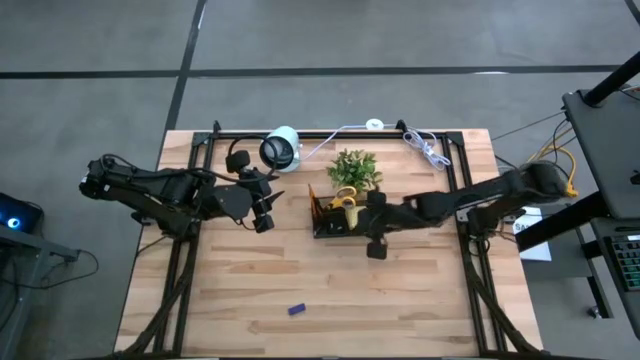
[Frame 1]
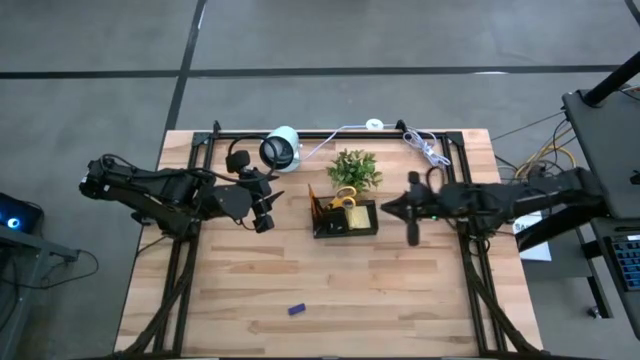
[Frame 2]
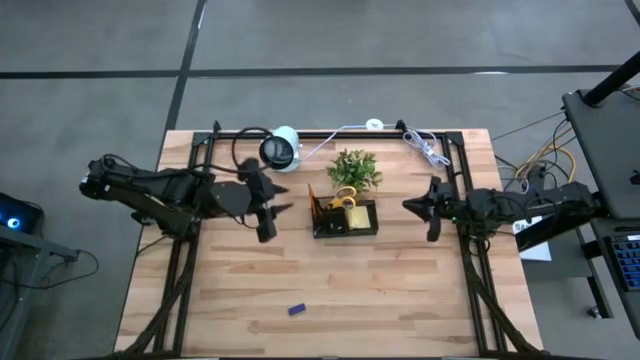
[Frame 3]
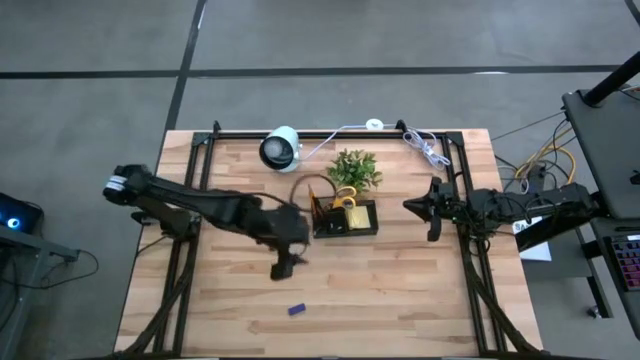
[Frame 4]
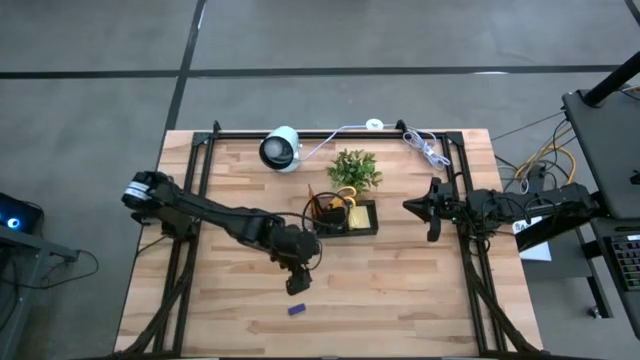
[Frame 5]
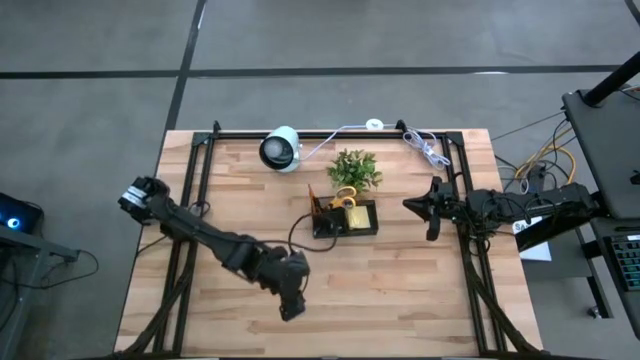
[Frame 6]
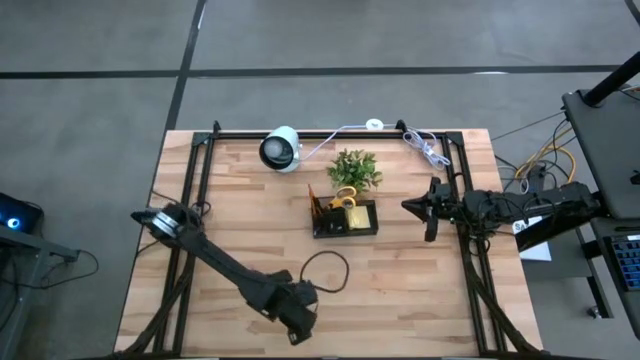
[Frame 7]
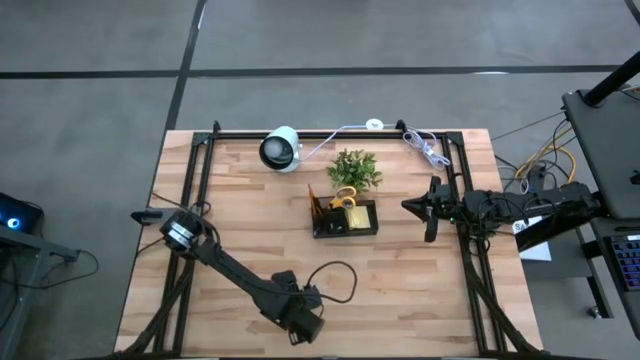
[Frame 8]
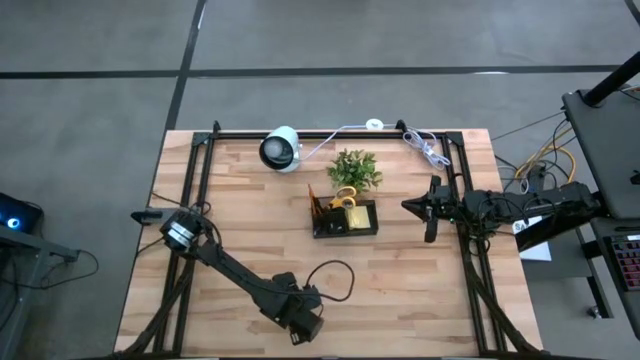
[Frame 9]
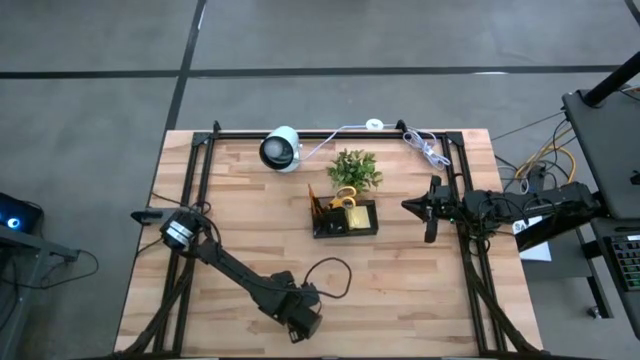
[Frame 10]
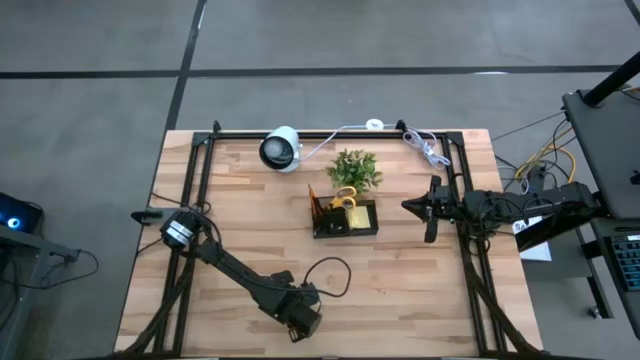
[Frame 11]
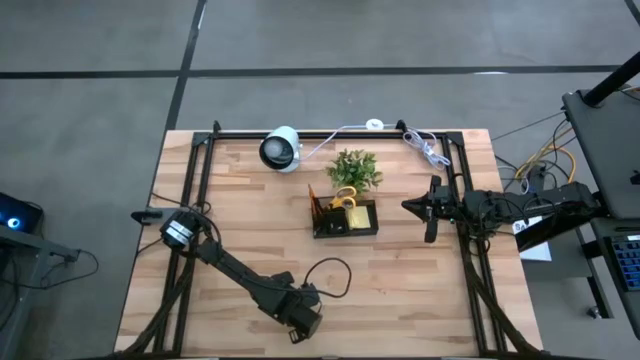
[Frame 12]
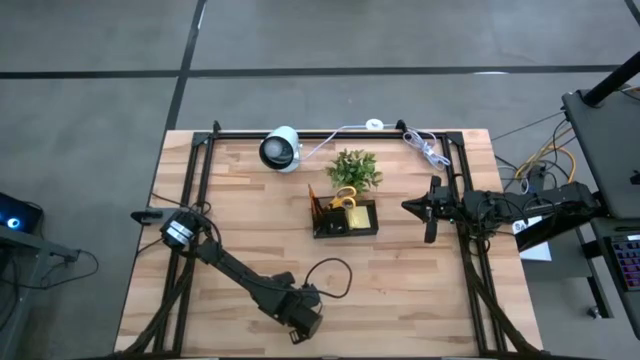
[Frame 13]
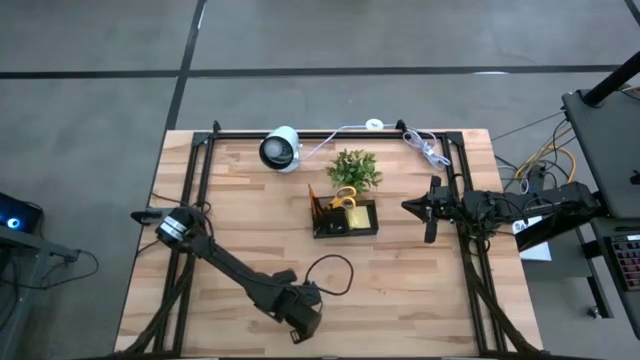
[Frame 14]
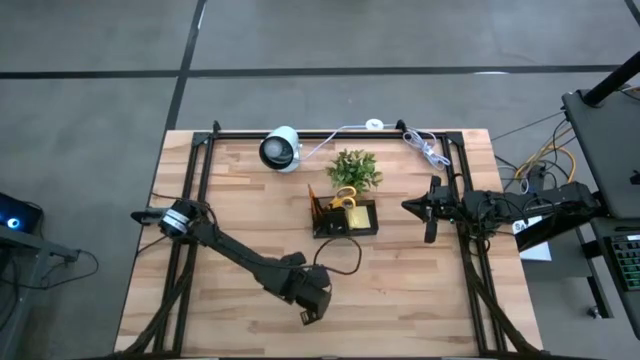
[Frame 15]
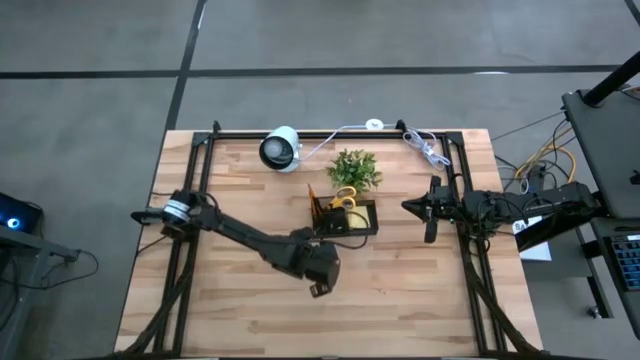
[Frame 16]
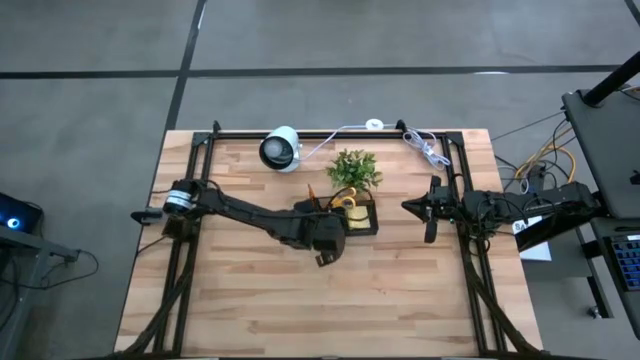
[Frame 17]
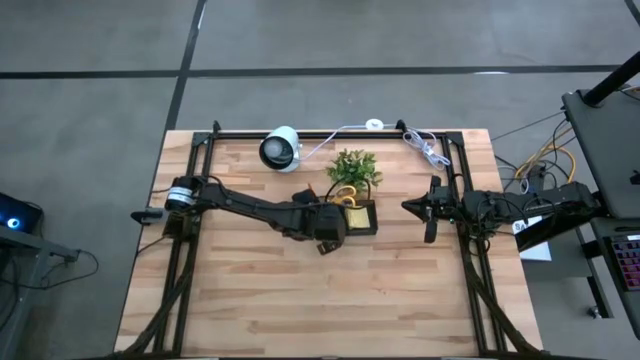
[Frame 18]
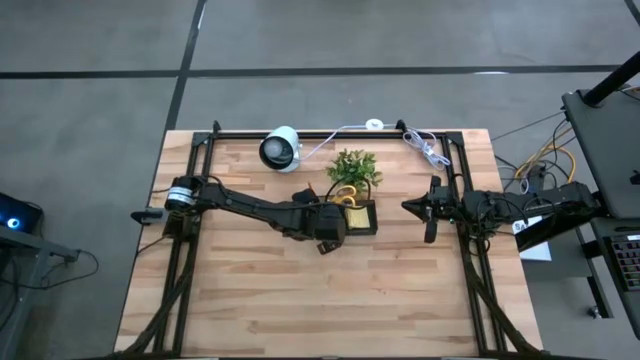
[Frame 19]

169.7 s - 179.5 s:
Task: Pick and place office supplies into organizer
Put the blue eraser into the black desk organizer

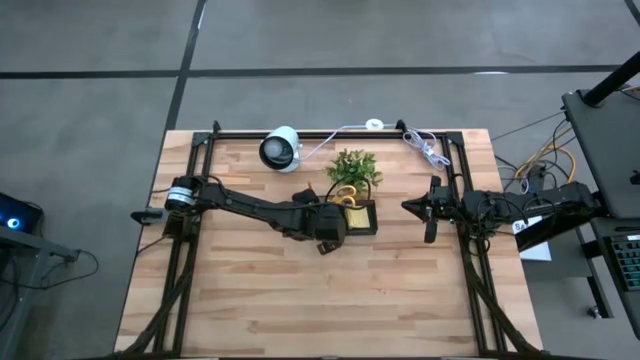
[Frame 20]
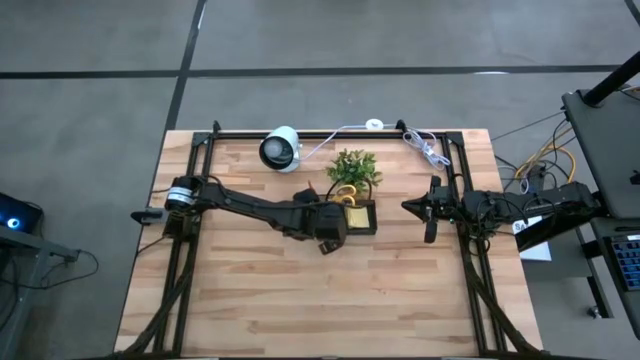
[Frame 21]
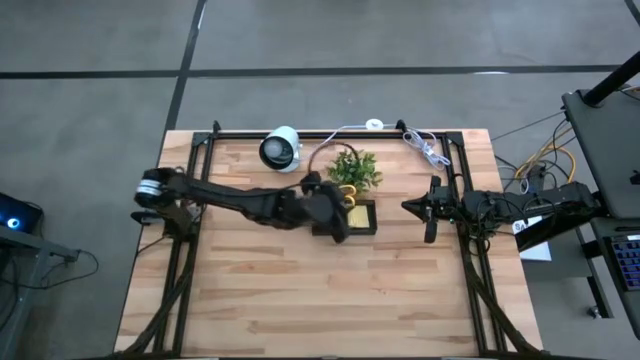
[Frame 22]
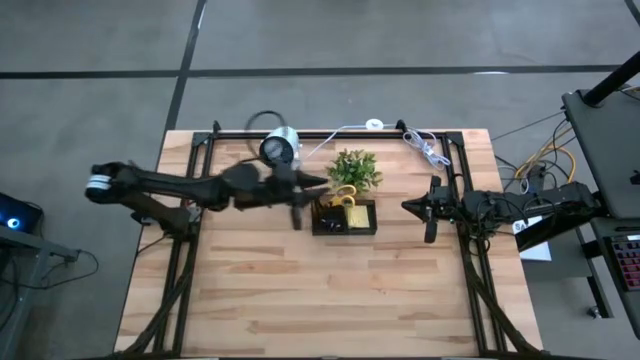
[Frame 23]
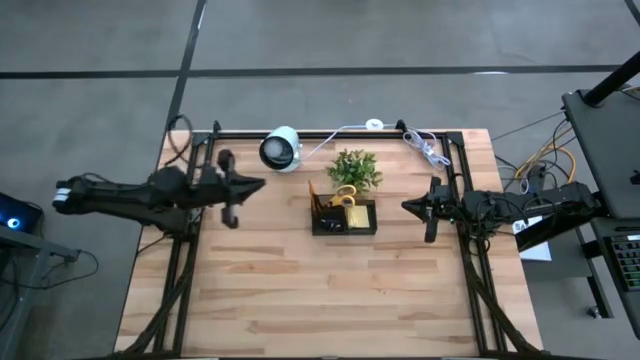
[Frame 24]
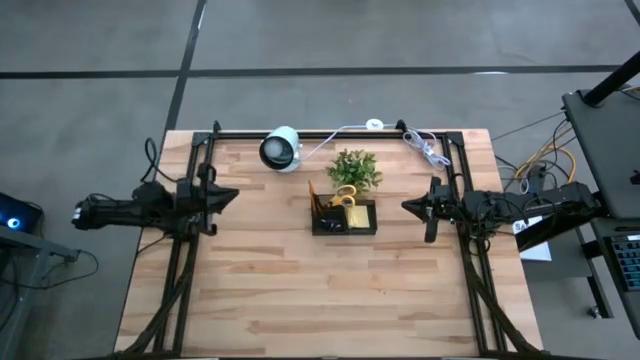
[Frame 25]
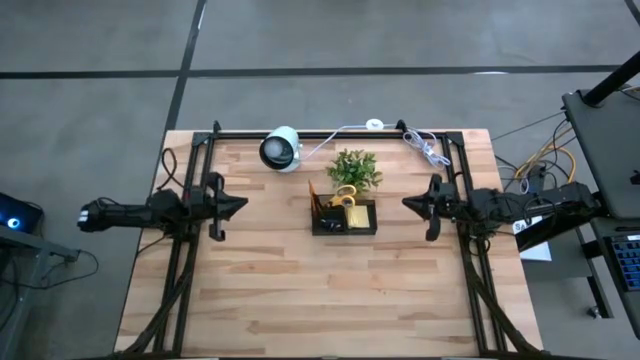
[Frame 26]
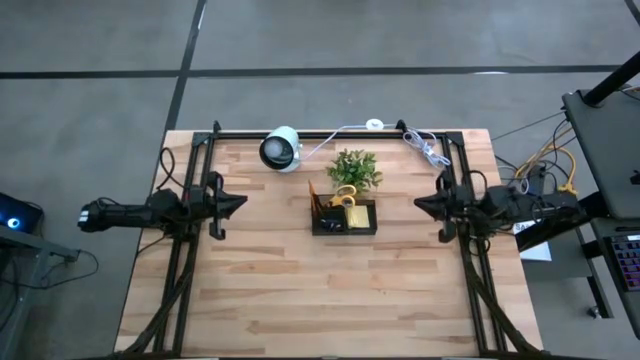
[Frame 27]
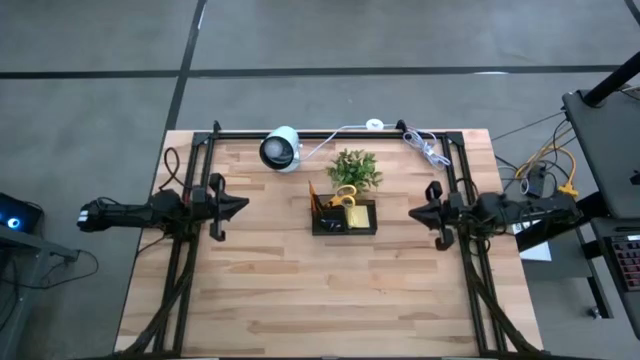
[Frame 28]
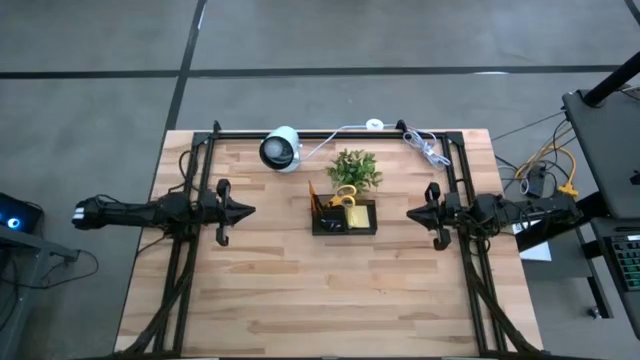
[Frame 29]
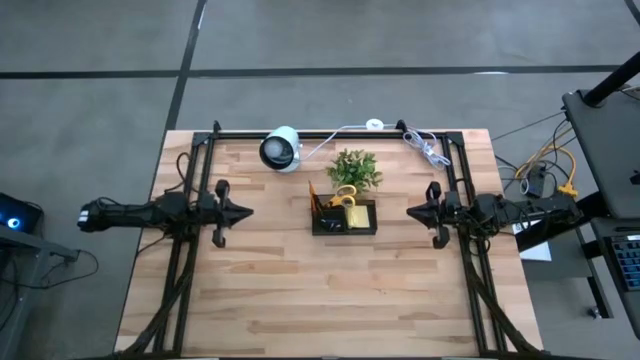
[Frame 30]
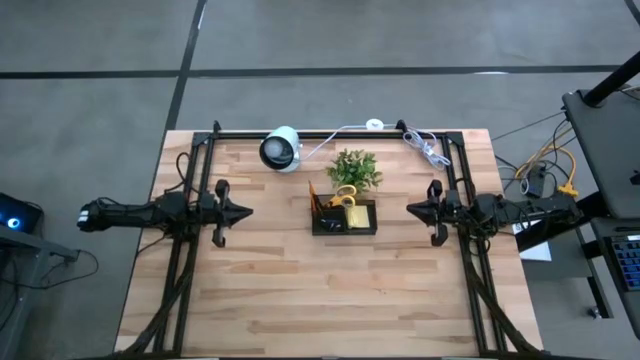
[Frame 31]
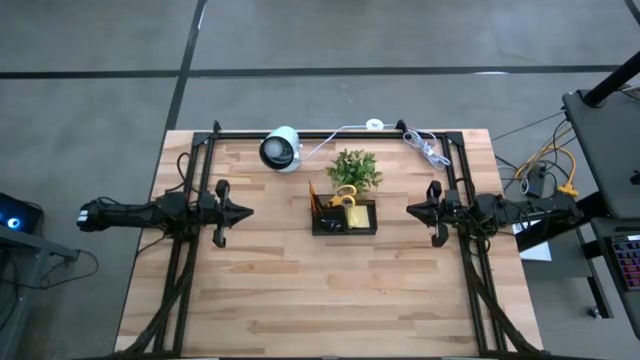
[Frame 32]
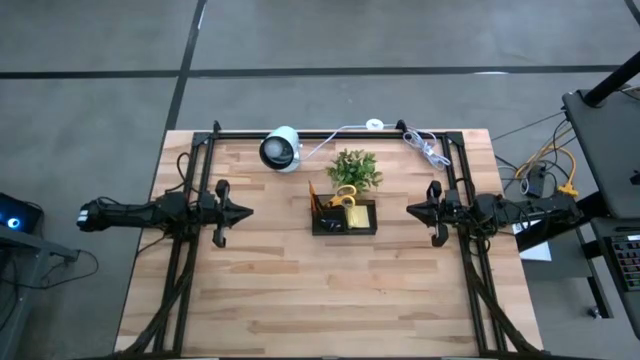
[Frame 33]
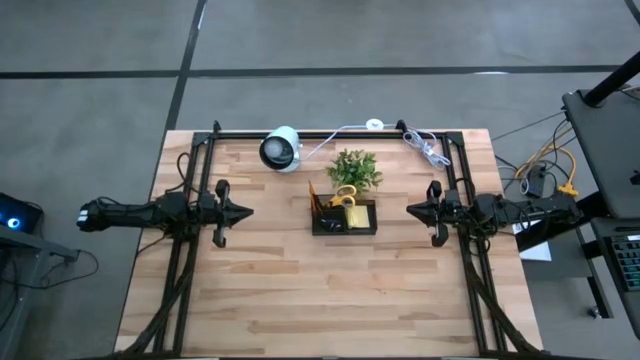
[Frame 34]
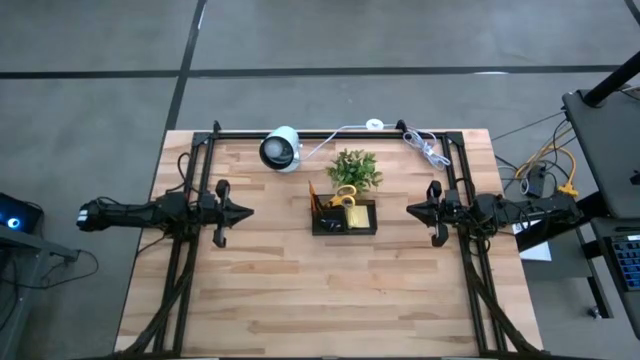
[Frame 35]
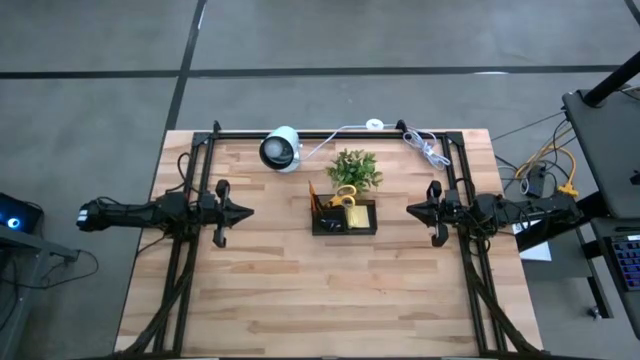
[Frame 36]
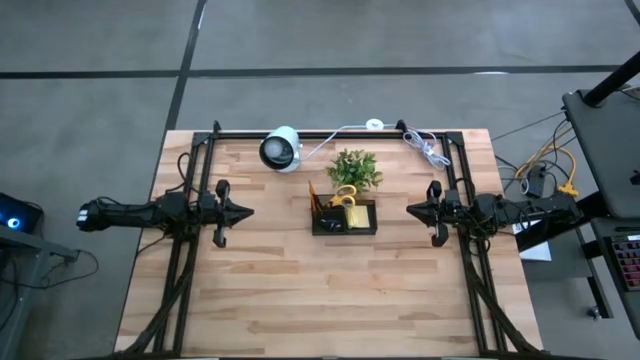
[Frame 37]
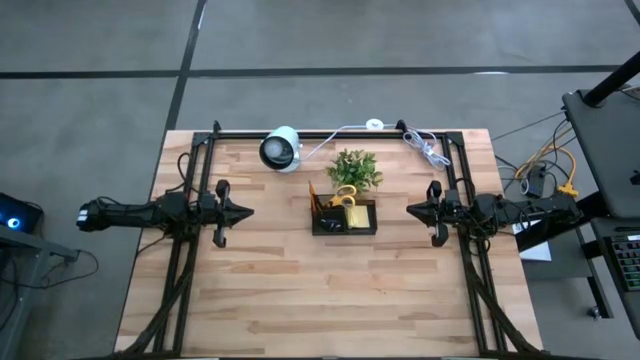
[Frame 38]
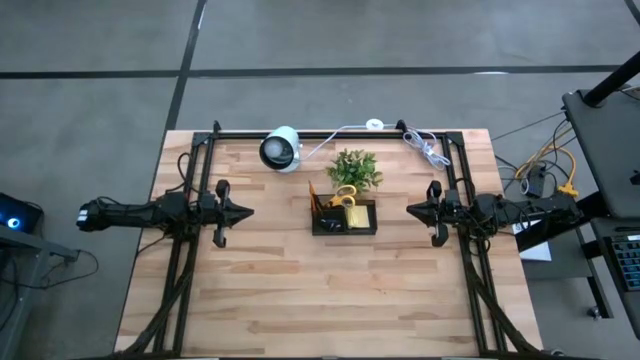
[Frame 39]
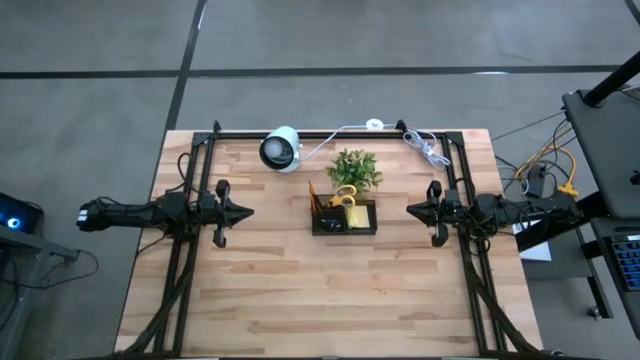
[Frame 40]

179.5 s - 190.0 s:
Return to Home Position

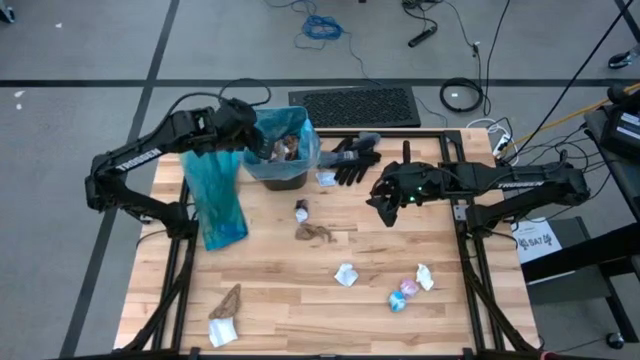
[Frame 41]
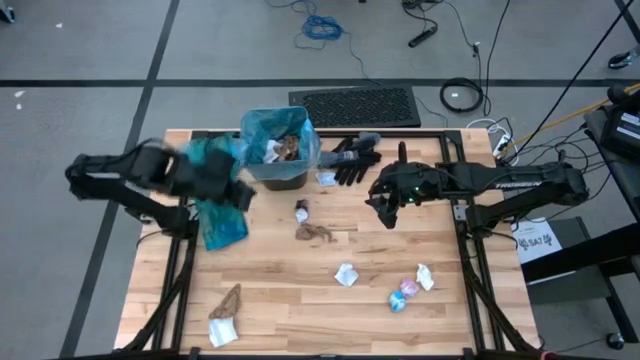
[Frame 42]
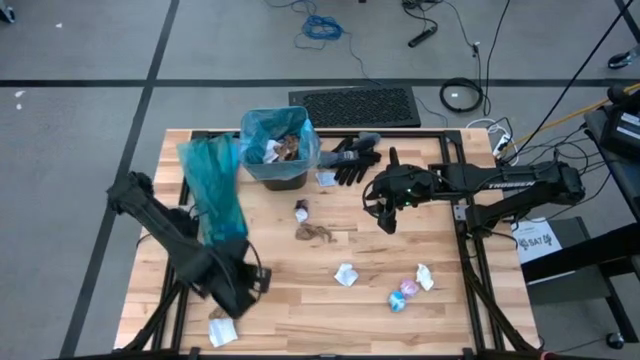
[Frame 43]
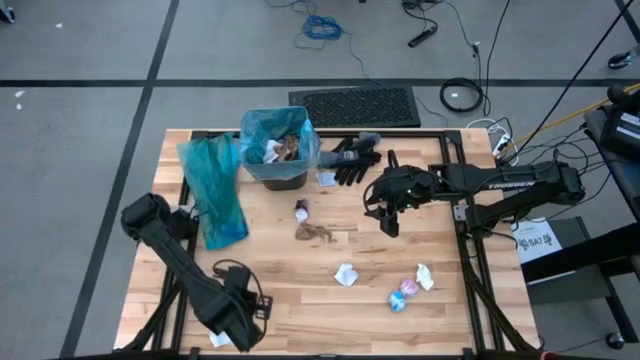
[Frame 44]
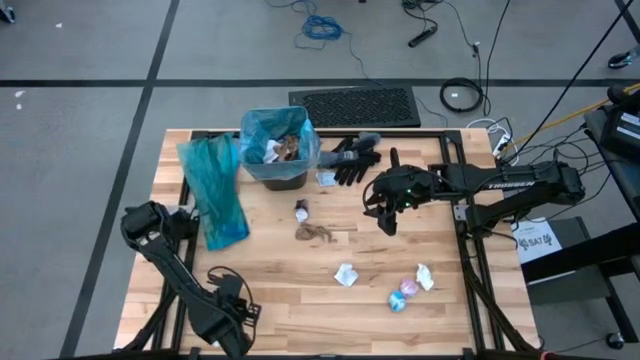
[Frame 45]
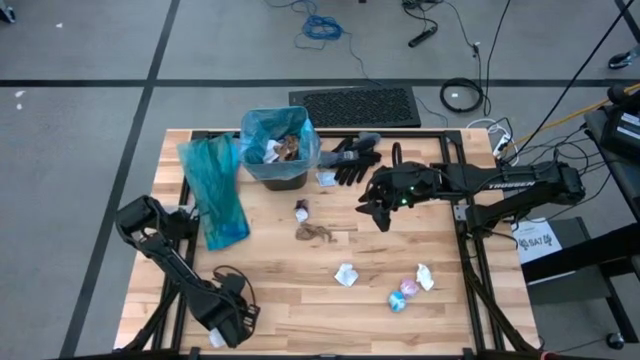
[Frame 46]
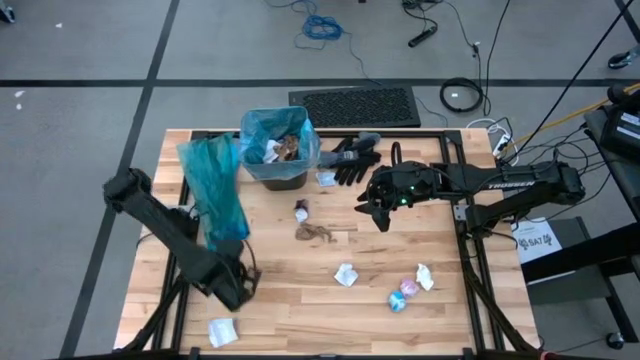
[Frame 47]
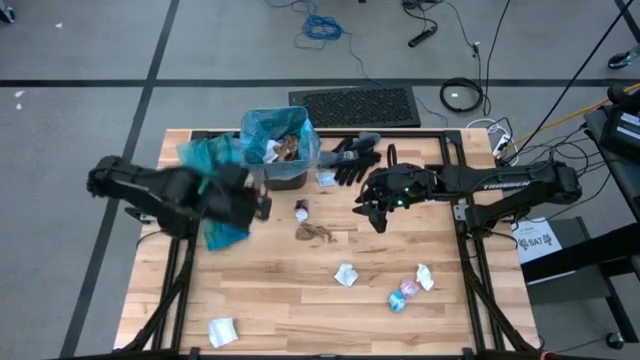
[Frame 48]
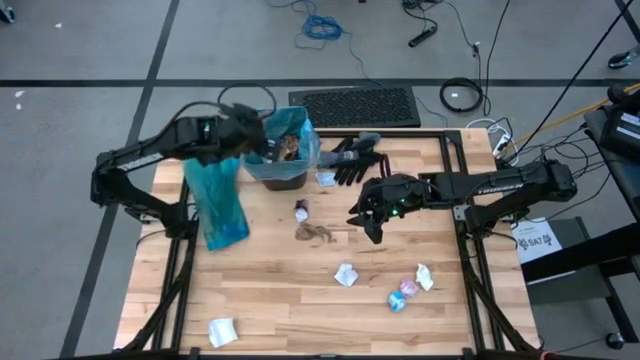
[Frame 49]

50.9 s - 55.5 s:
Task: place trash/remove bag and relplace
Put the brown napkin into the trash bin
